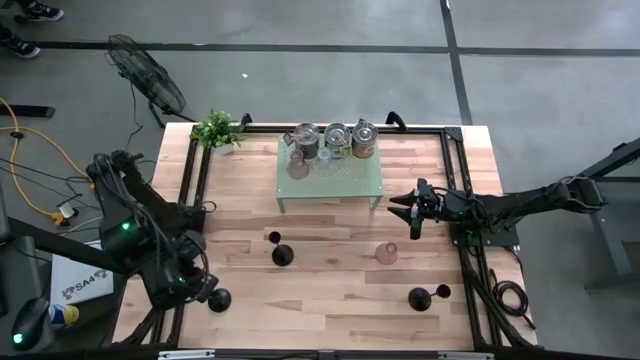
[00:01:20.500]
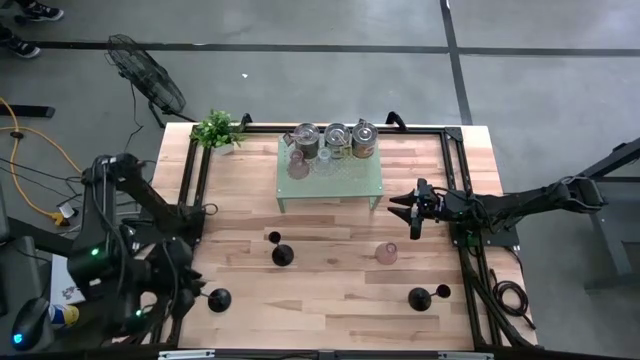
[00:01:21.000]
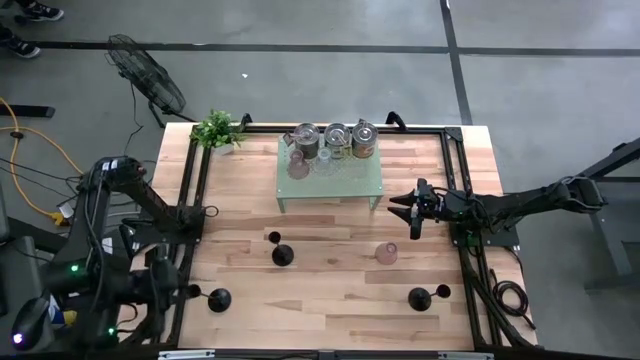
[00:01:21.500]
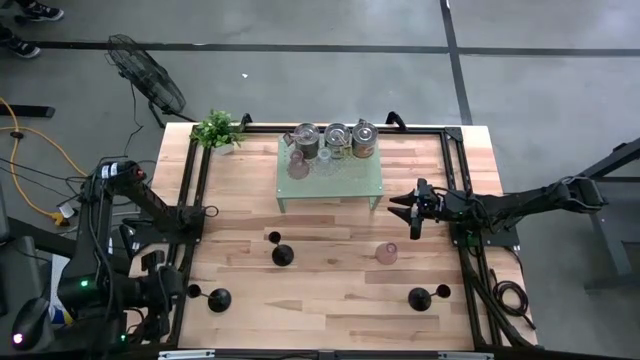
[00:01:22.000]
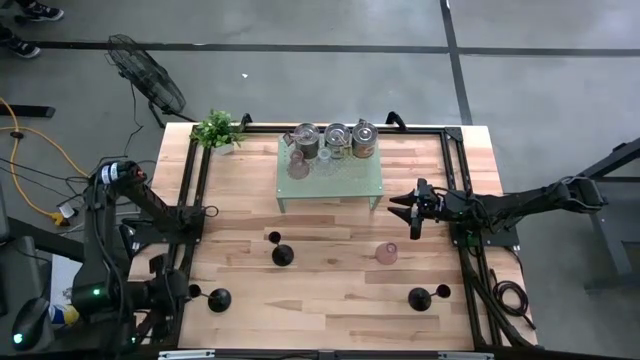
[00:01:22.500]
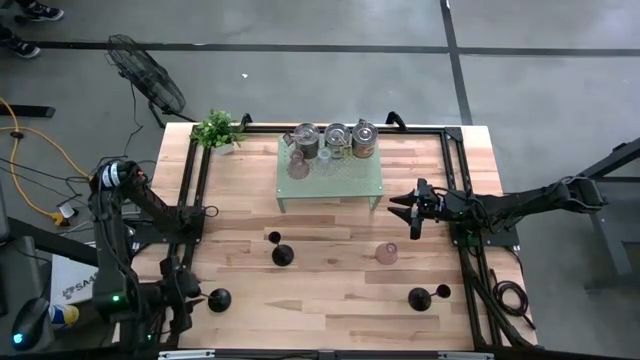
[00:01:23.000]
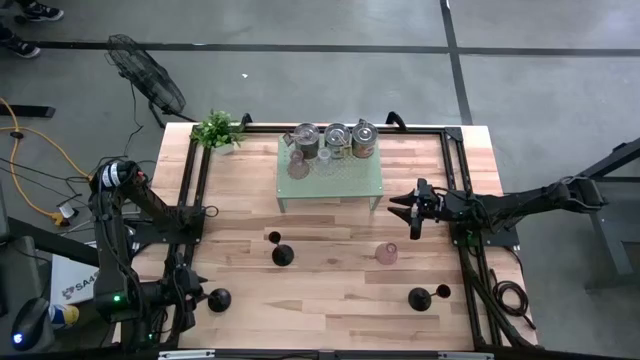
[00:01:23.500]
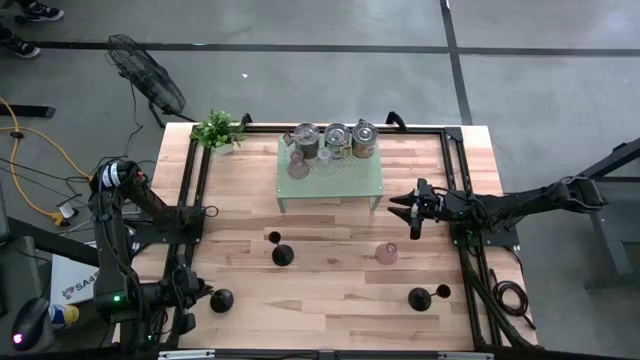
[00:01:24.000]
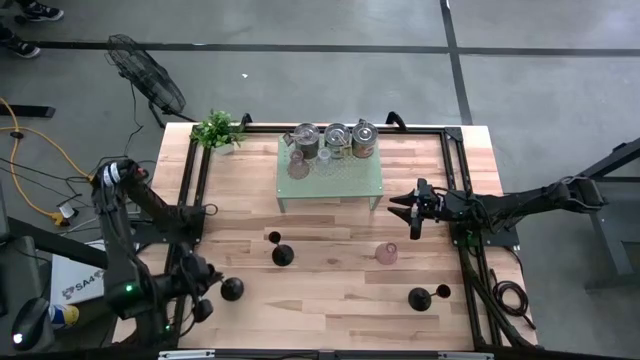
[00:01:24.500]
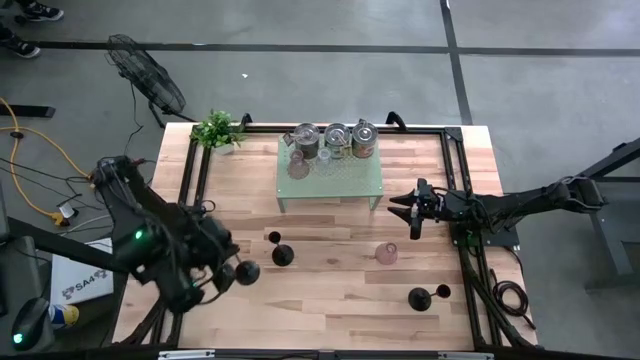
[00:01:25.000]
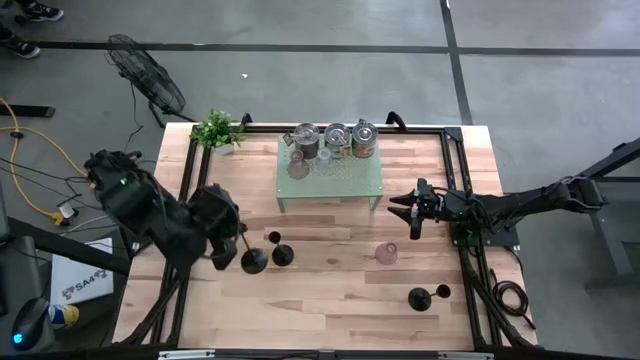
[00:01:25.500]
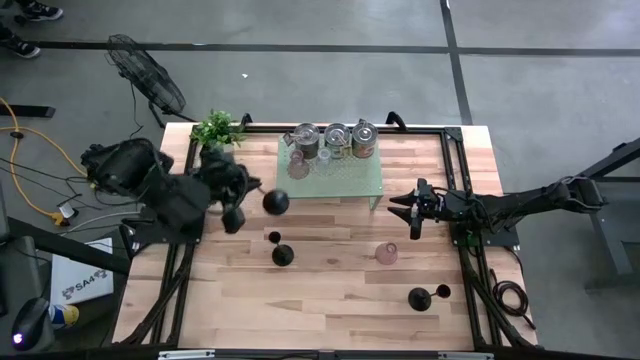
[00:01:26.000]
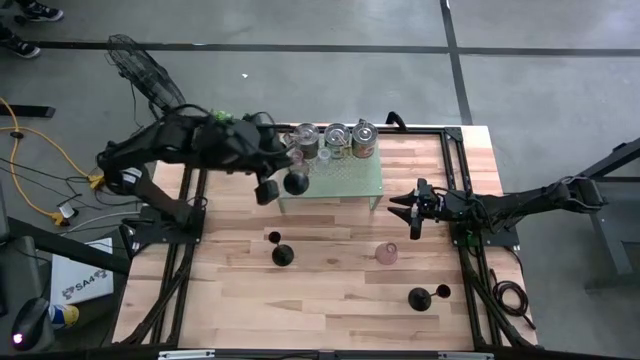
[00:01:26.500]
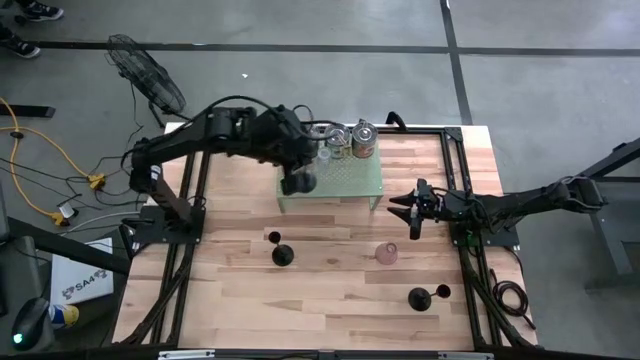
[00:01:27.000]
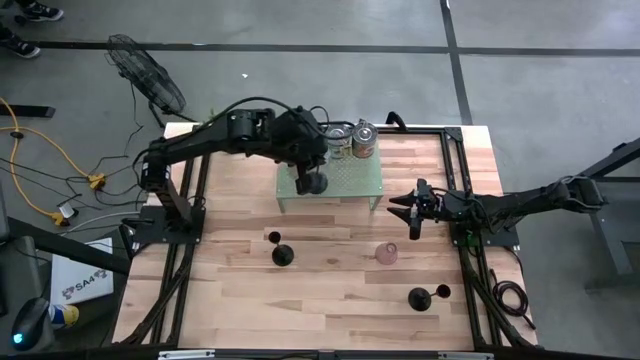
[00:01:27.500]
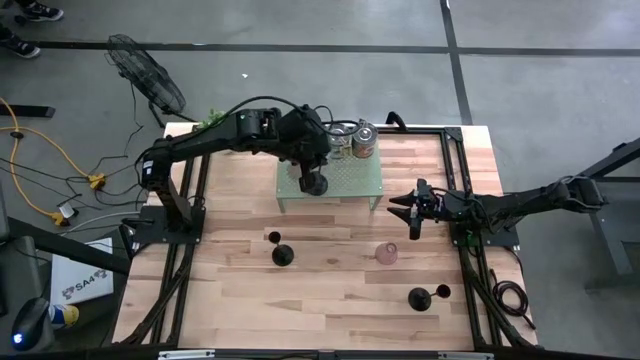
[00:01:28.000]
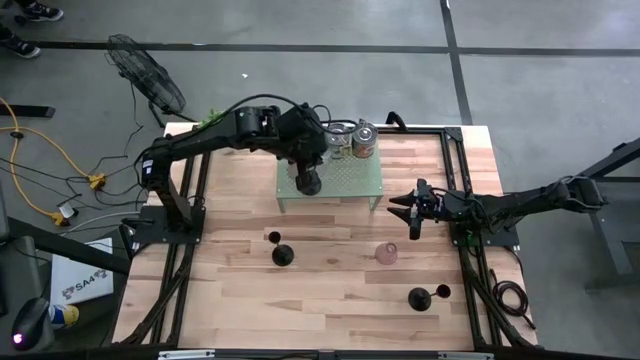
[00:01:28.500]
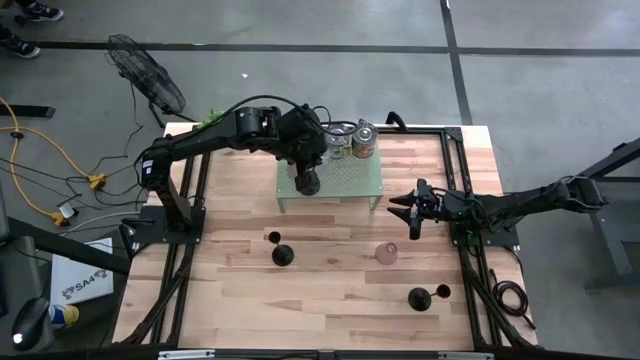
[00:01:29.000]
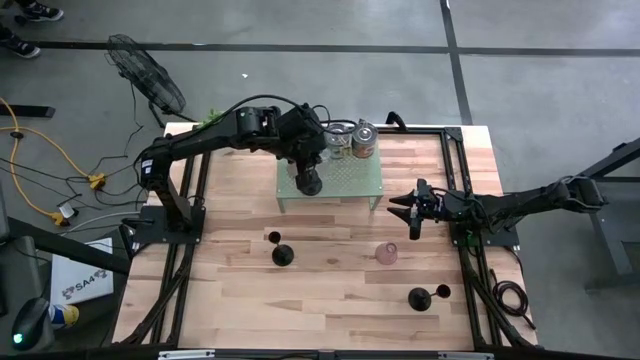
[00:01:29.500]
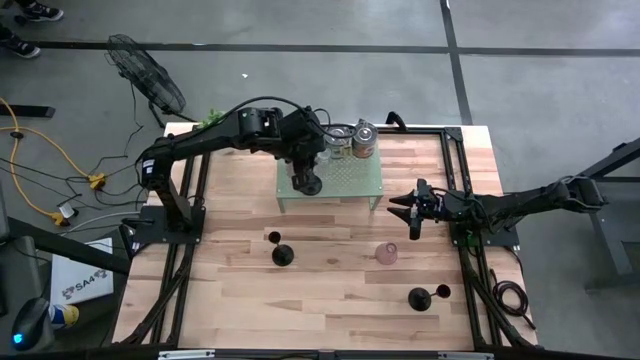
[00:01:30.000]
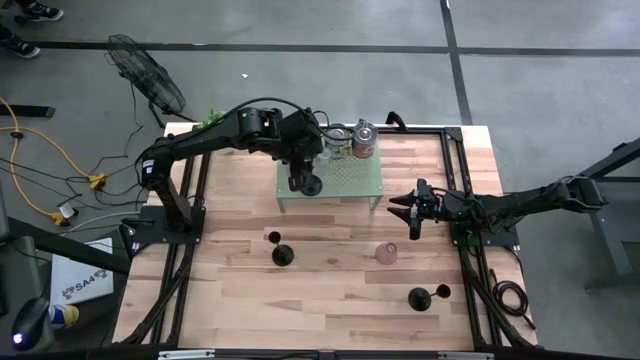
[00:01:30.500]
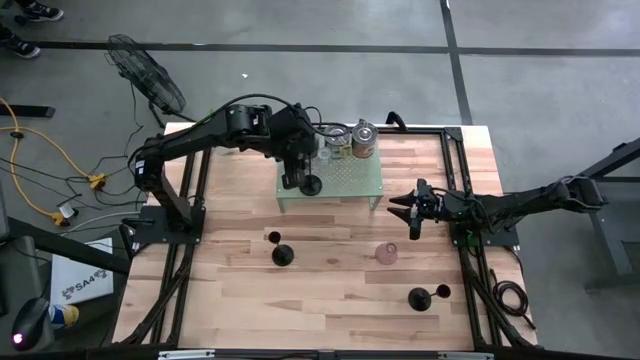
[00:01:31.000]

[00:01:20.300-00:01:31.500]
Task: Pick & Place candle stick holders
Put the left black candle holder on the shelf

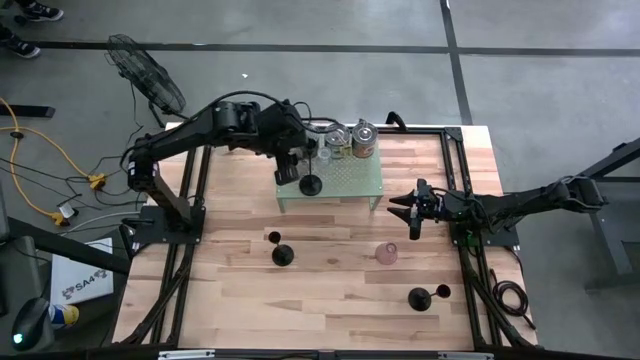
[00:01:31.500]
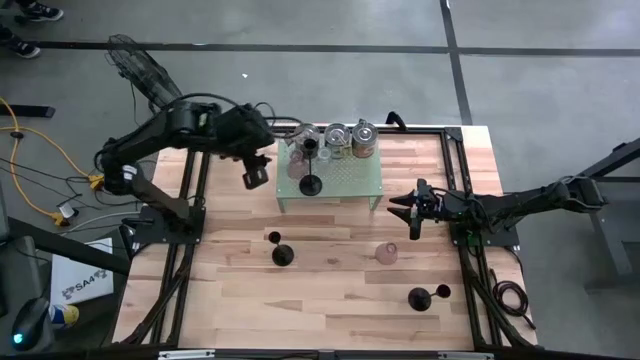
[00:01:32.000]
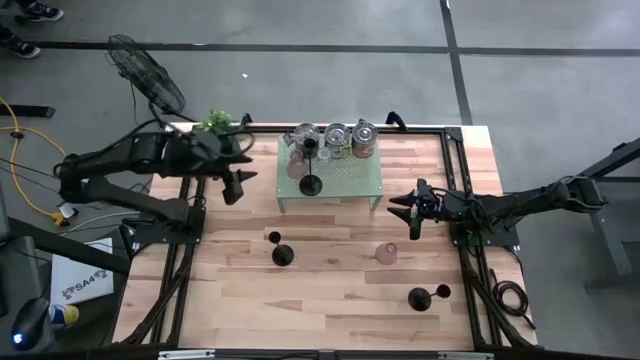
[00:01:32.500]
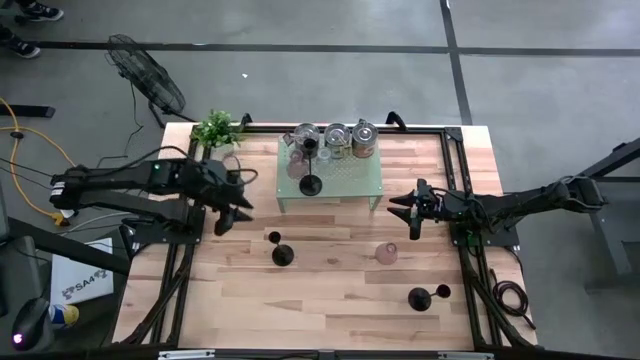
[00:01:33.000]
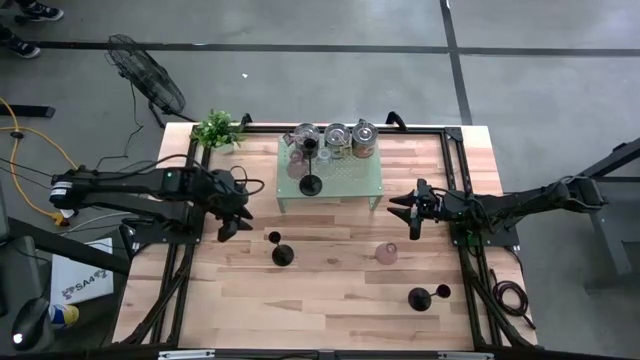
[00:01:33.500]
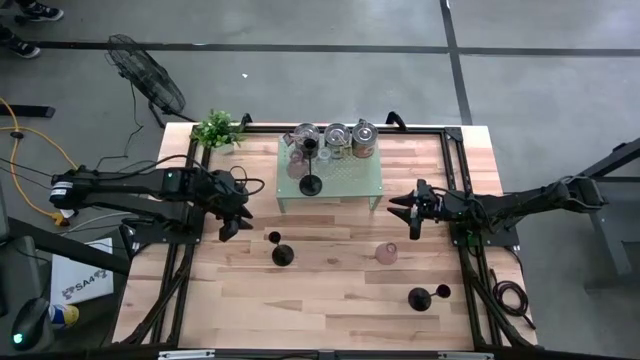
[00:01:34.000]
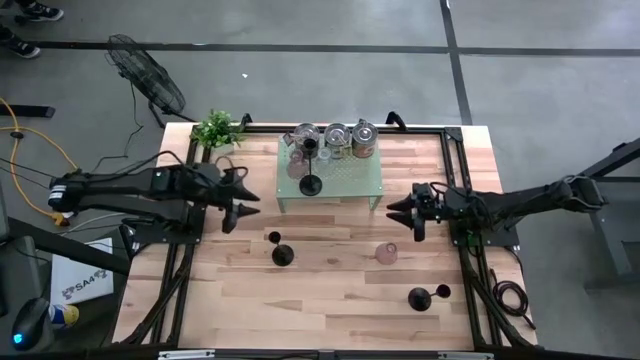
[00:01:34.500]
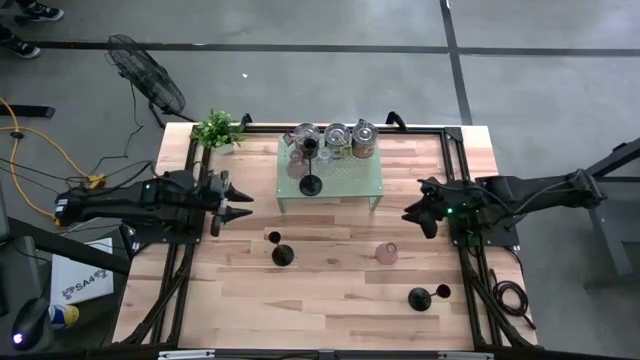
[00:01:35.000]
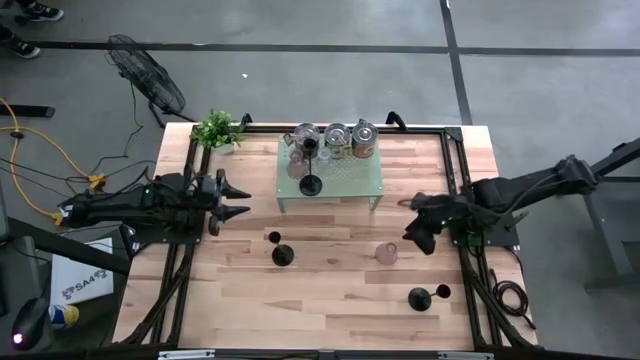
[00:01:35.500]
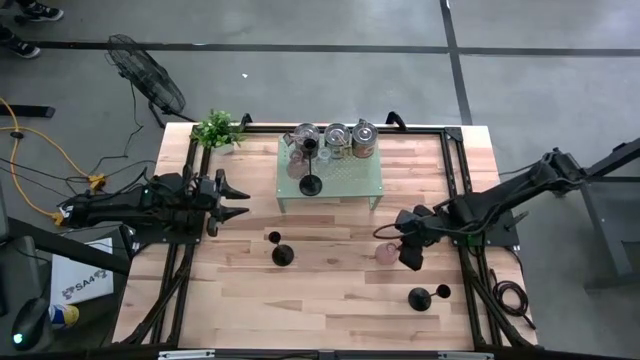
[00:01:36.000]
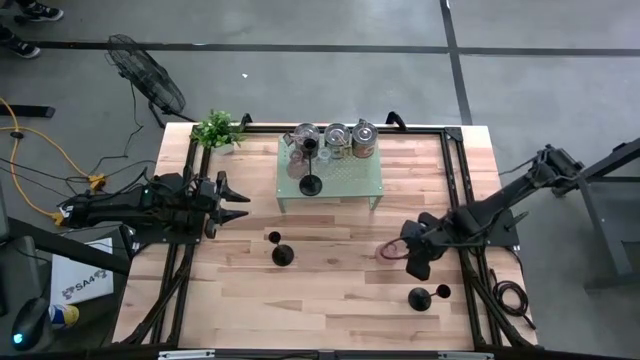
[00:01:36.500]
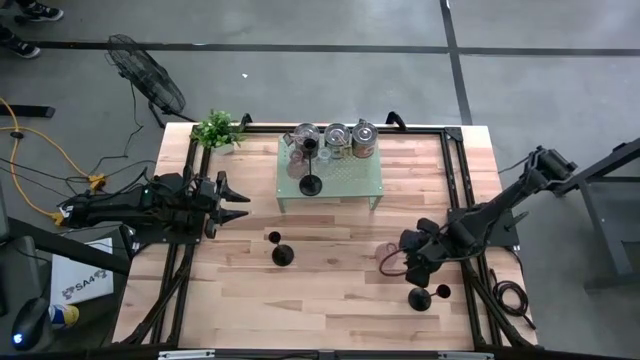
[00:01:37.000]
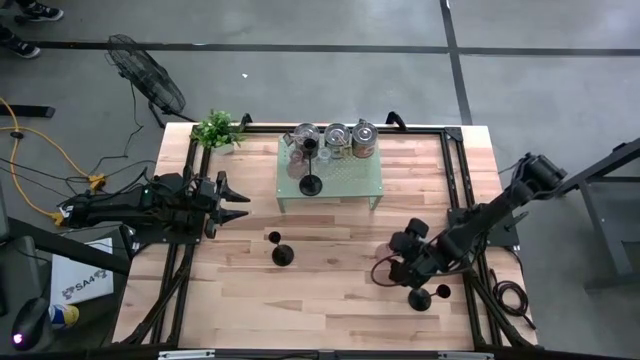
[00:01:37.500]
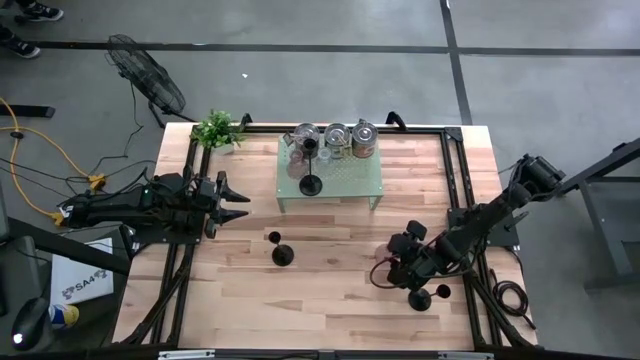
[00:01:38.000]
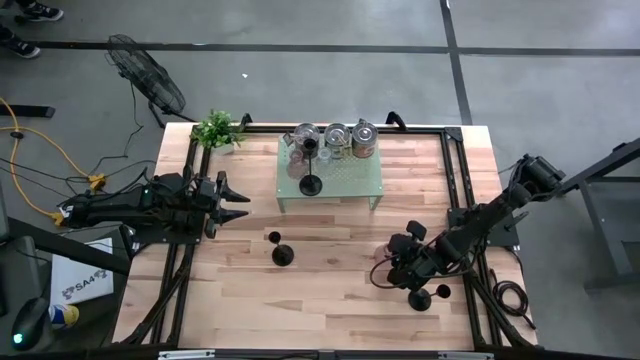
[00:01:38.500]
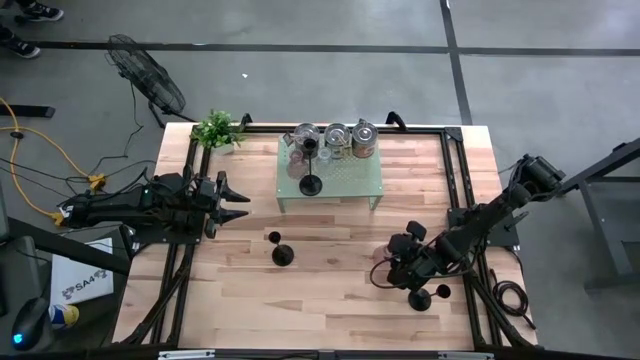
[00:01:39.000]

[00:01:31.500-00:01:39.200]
Put the pink candle holder on the shelf

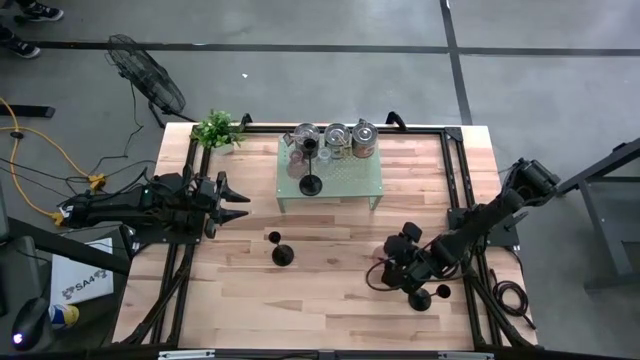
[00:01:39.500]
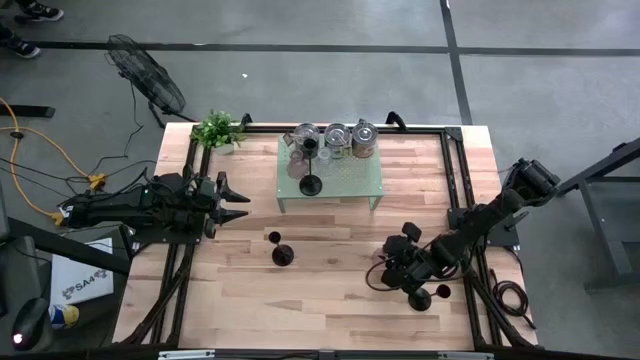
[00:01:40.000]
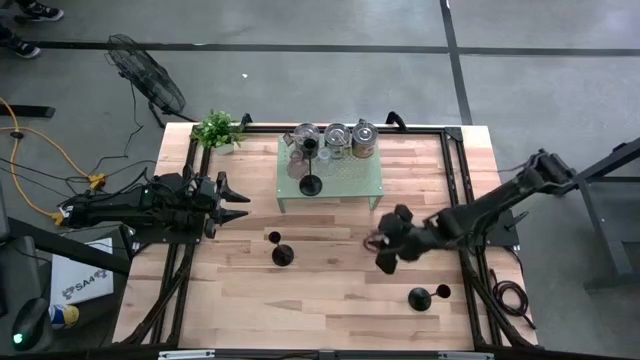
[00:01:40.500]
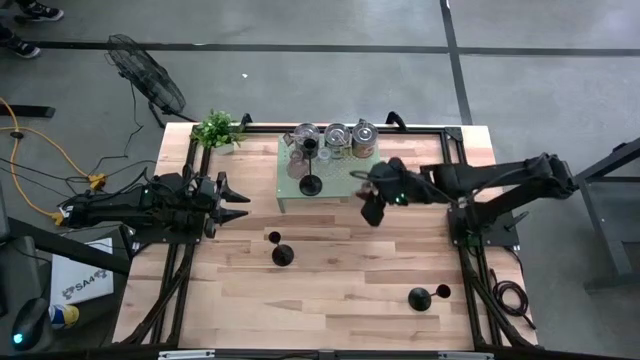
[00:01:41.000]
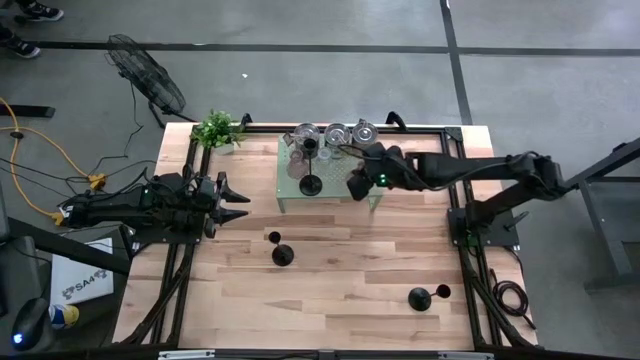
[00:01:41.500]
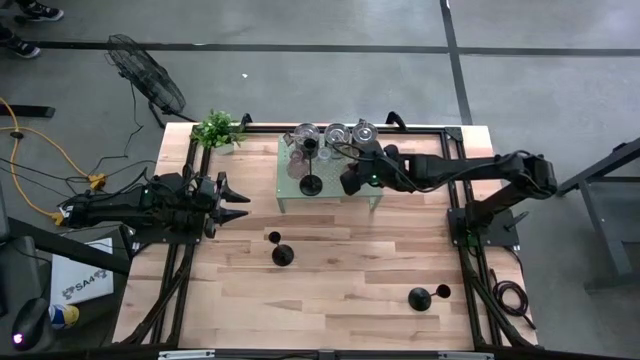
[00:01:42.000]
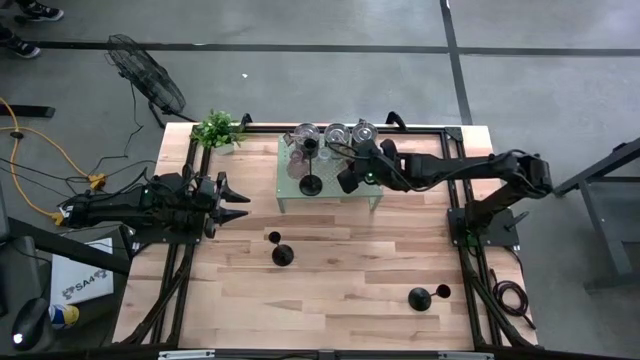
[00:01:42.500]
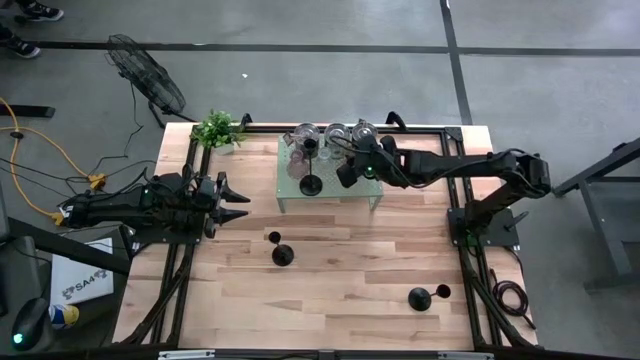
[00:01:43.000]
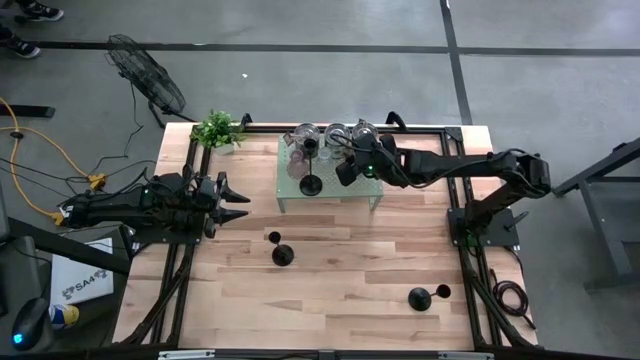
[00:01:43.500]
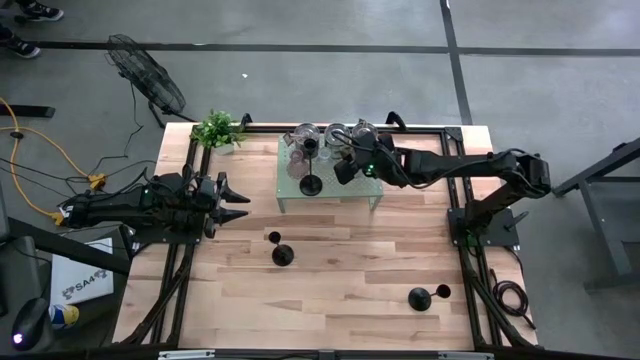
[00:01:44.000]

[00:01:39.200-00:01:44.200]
Put the pink candle holder on the shelf aligned with the transparent candle holder
